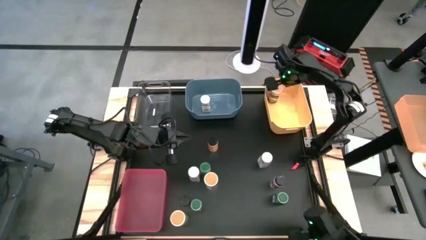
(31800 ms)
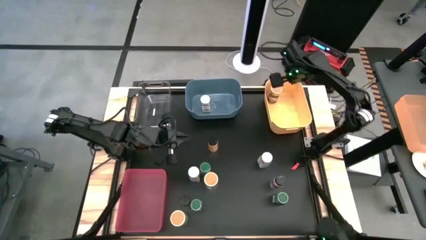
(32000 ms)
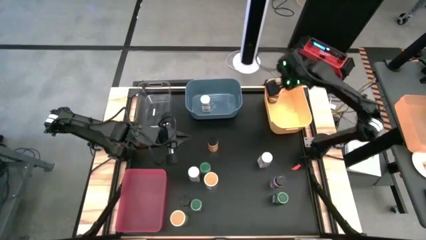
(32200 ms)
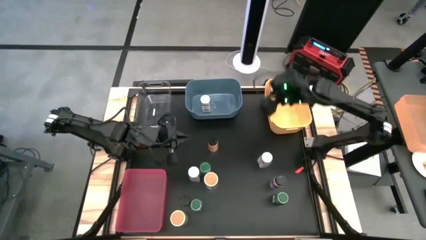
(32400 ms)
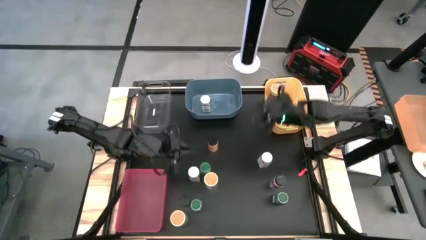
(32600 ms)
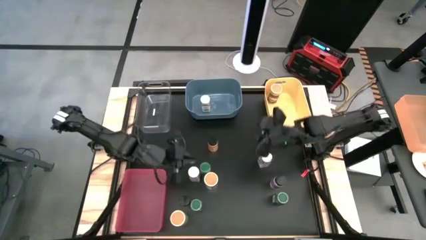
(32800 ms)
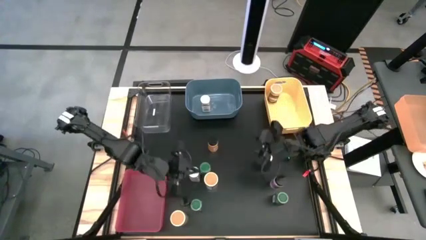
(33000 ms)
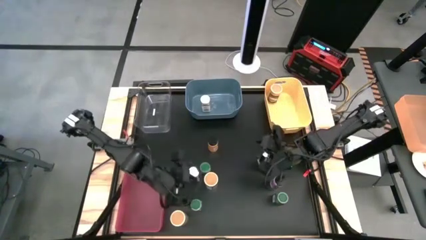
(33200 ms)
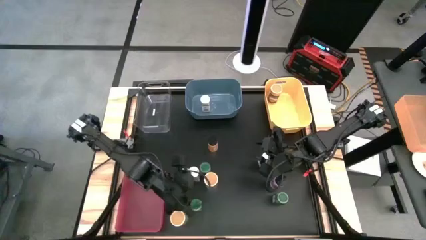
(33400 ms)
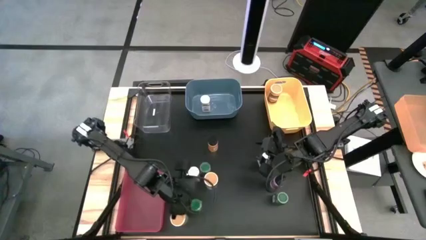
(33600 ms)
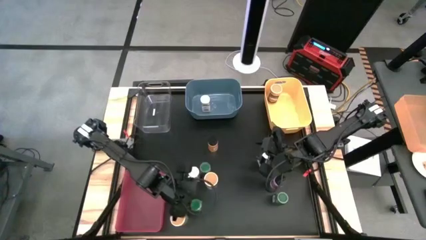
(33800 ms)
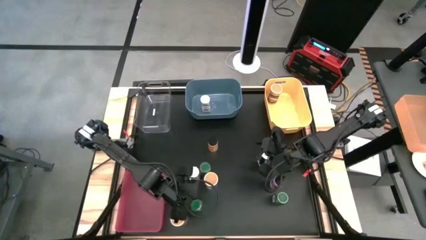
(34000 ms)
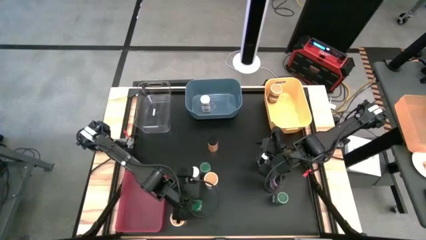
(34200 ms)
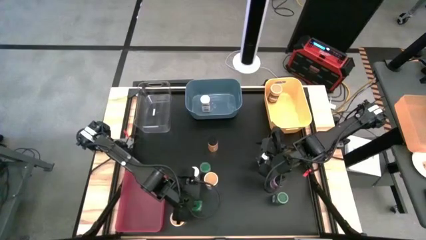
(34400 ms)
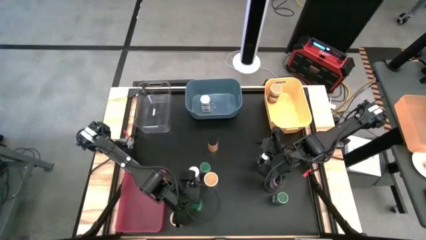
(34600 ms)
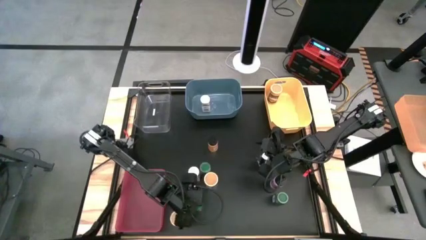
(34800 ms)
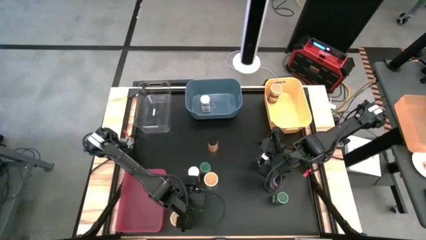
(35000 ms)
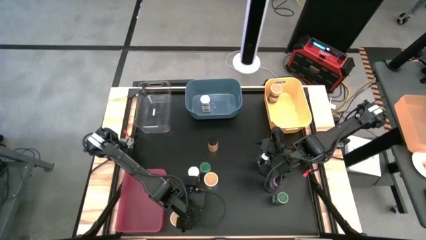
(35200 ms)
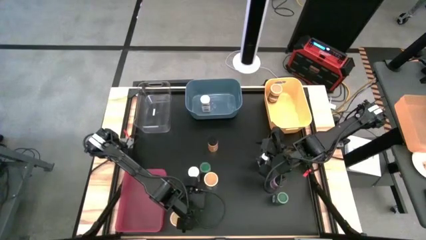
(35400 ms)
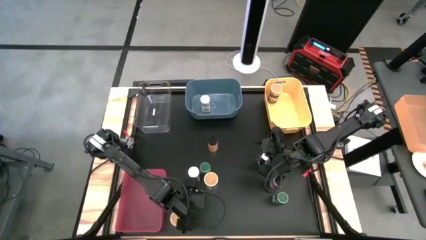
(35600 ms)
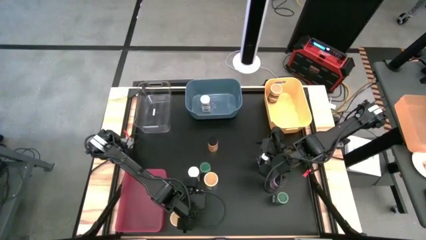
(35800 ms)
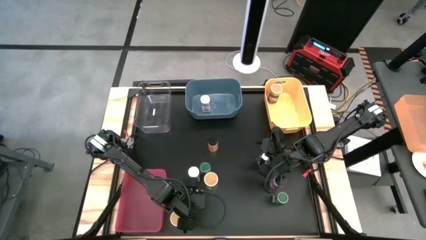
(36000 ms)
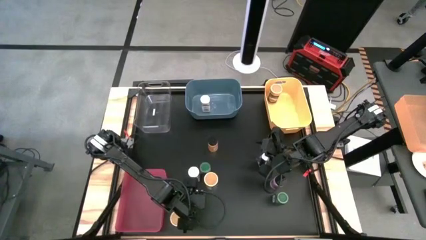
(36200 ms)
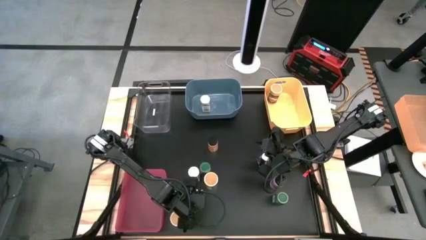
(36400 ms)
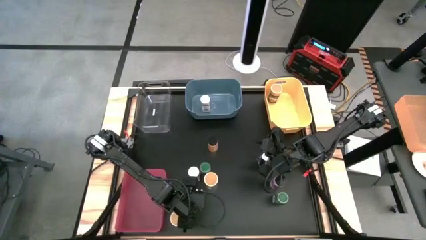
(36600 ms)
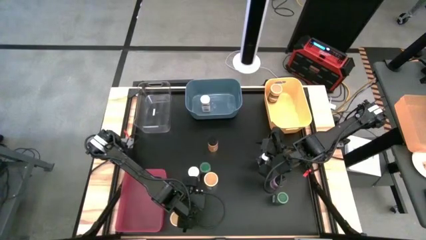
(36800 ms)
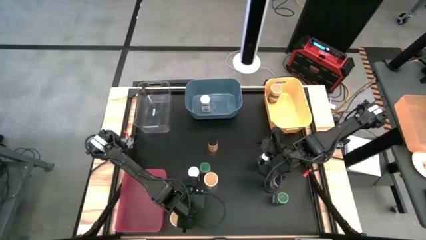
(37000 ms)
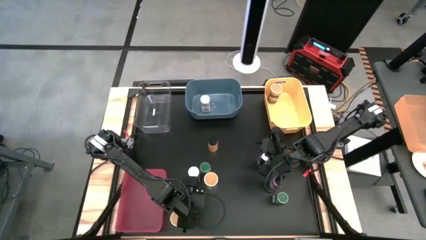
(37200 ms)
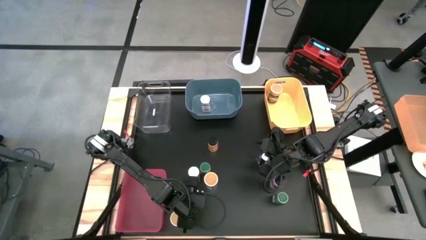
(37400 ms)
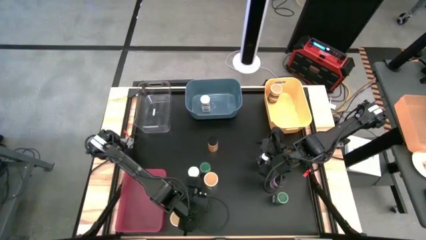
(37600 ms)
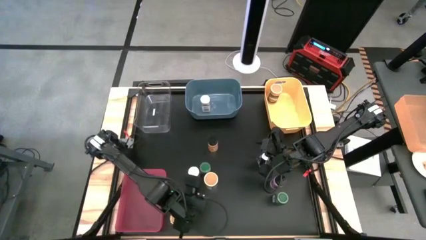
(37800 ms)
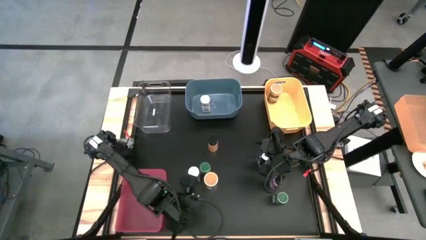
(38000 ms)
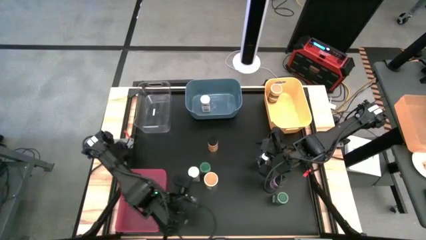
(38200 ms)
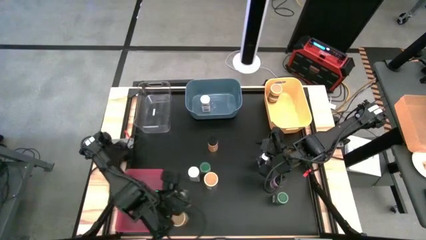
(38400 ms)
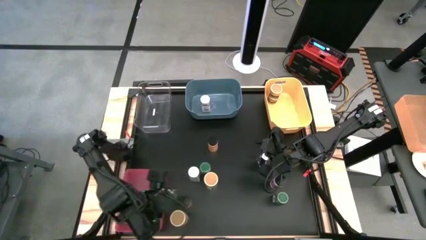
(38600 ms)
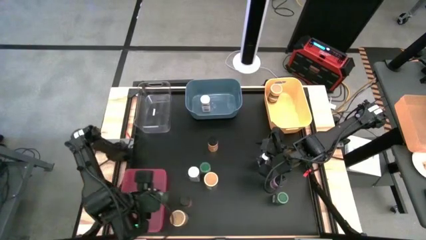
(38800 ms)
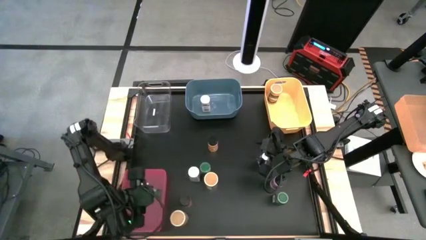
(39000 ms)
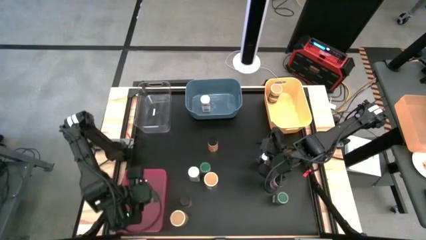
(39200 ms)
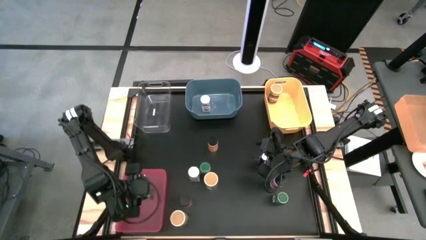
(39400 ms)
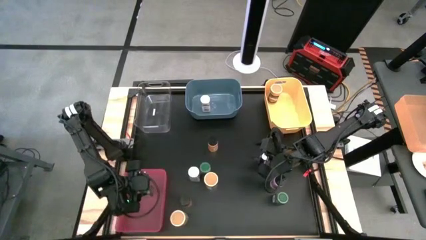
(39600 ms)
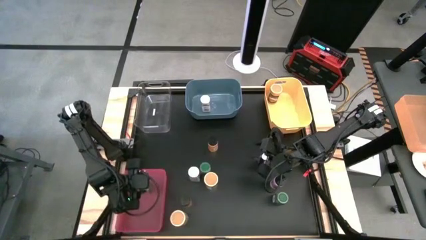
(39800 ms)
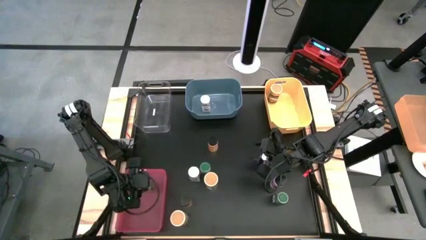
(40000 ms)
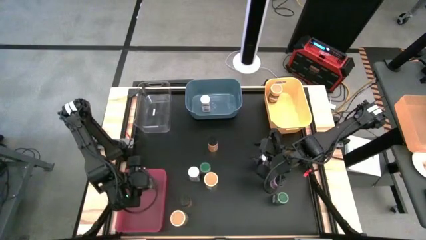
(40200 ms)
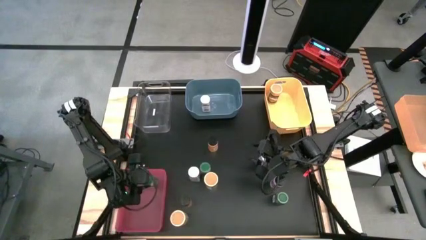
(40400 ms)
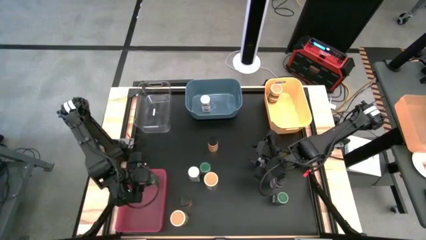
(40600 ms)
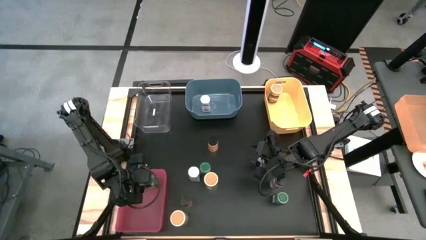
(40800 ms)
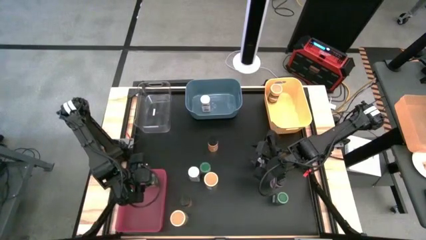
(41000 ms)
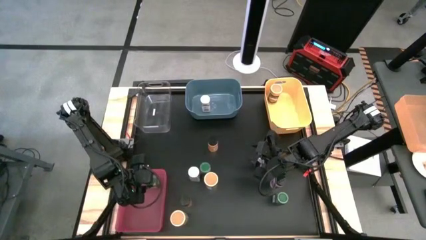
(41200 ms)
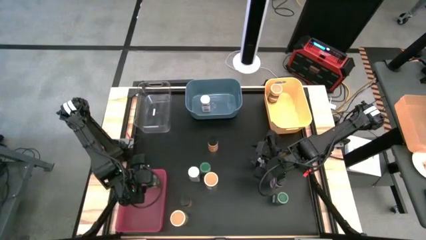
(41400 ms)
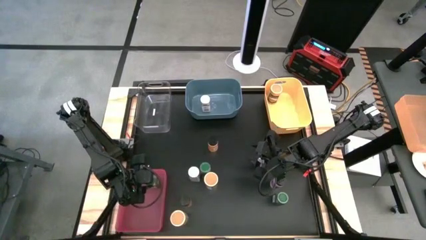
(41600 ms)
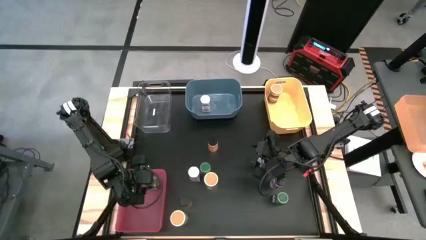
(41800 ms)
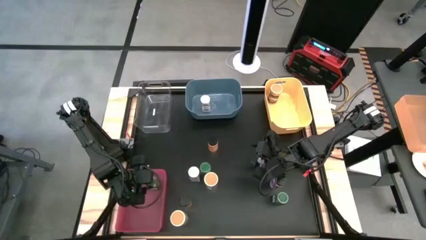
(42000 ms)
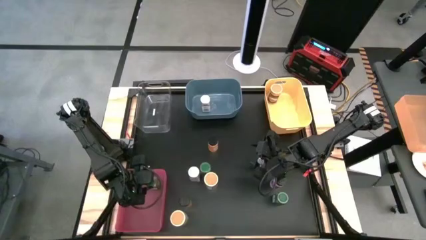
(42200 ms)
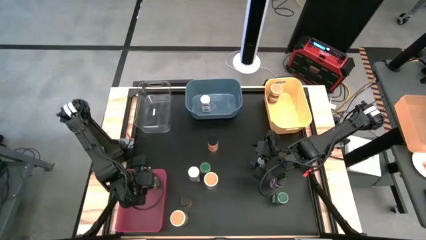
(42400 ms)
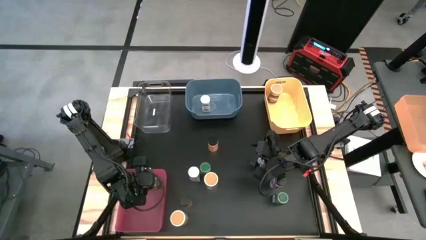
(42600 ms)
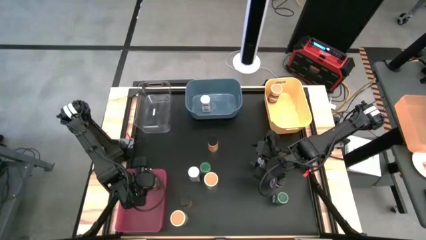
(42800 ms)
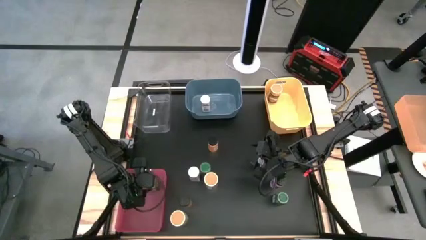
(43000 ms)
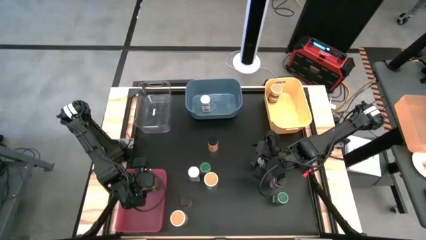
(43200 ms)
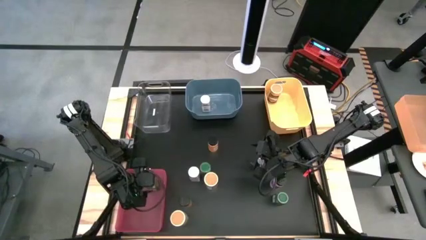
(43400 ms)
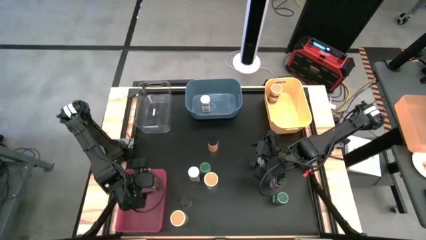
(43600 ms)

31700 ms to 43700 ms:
Task: Sort spices by type
Put the bottom left green seasoning bottle into the pink bin

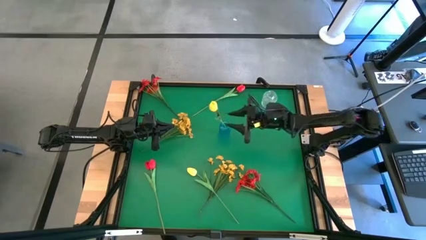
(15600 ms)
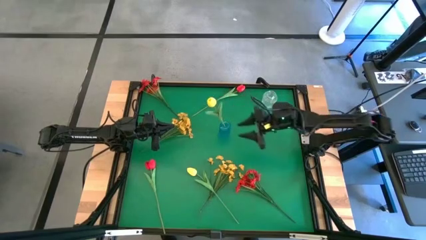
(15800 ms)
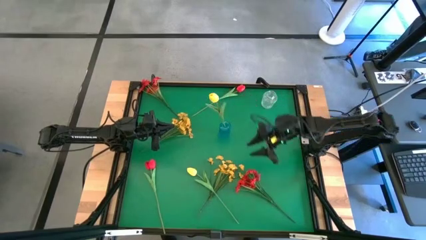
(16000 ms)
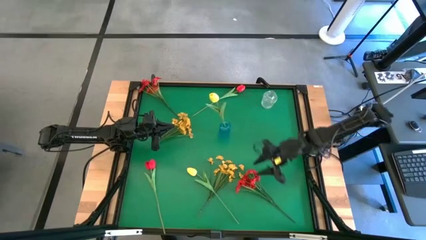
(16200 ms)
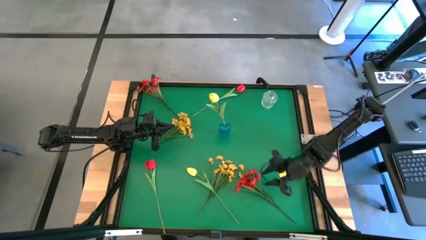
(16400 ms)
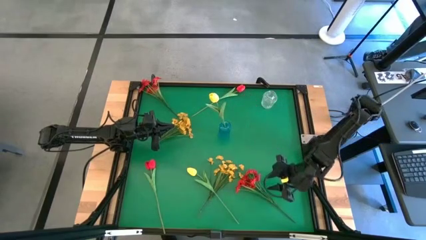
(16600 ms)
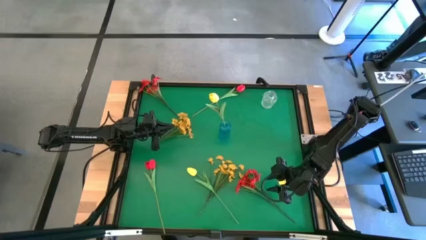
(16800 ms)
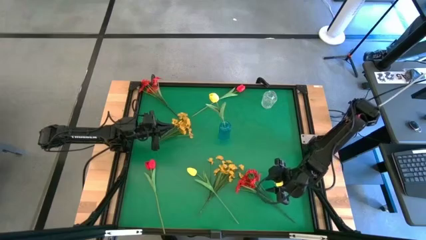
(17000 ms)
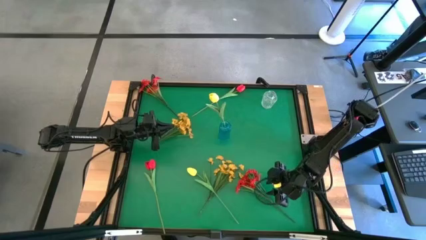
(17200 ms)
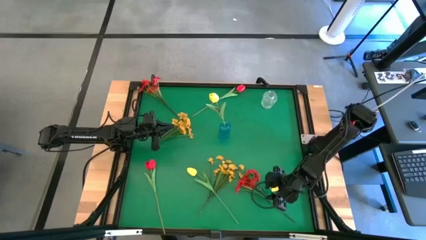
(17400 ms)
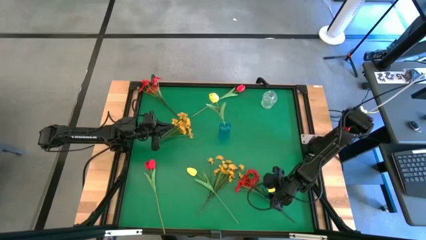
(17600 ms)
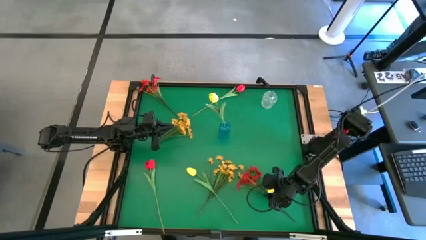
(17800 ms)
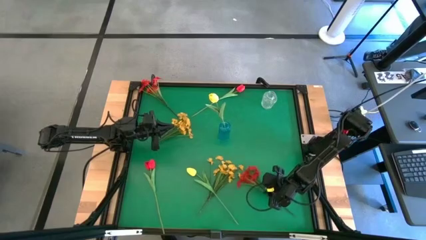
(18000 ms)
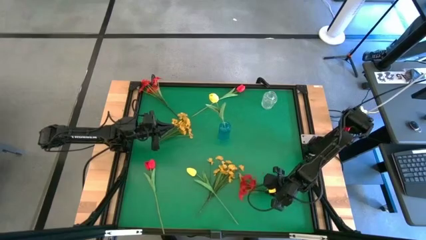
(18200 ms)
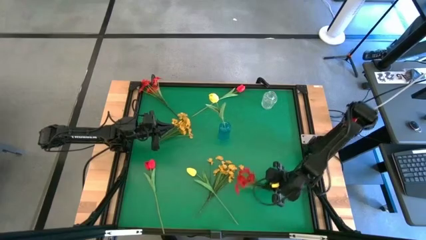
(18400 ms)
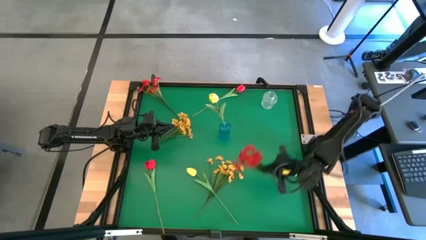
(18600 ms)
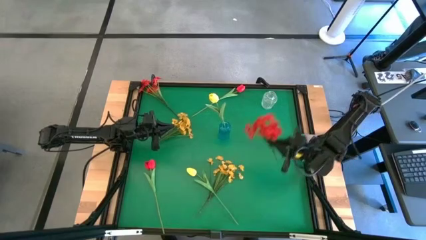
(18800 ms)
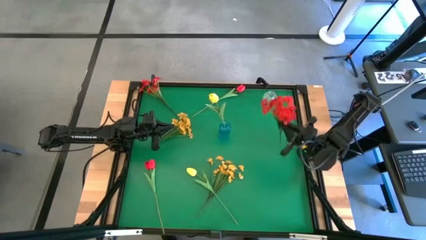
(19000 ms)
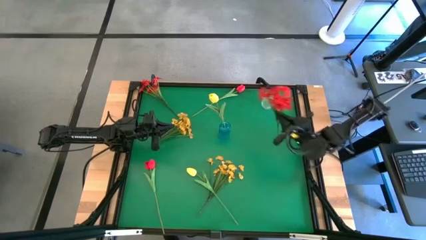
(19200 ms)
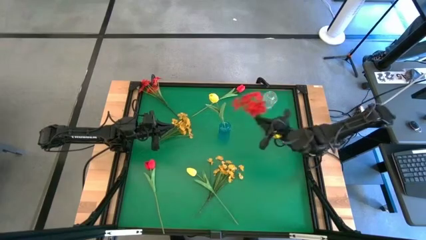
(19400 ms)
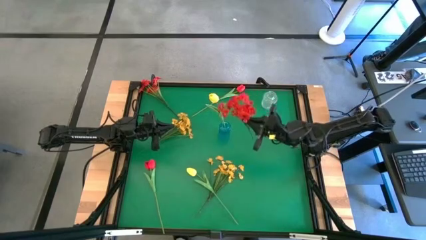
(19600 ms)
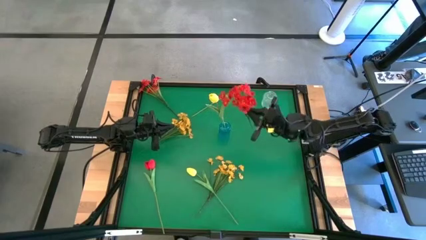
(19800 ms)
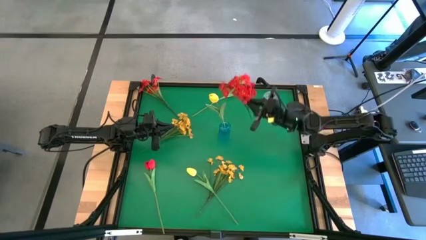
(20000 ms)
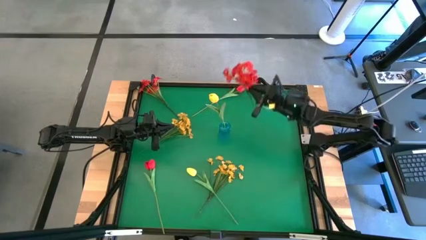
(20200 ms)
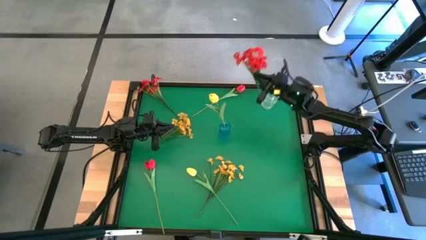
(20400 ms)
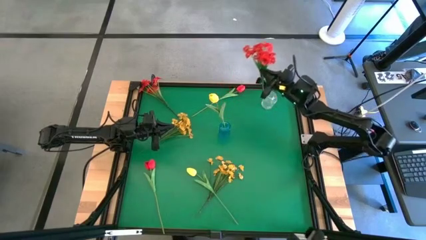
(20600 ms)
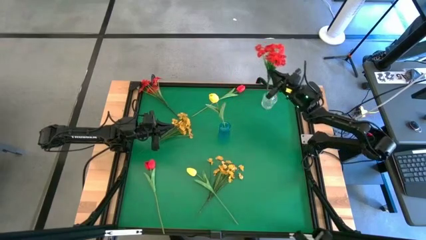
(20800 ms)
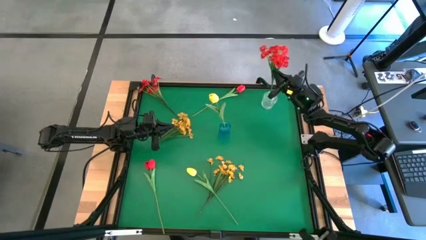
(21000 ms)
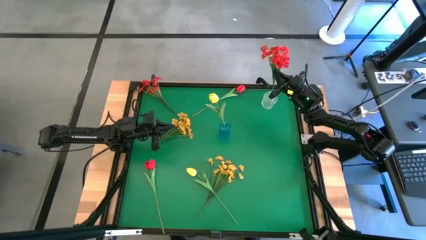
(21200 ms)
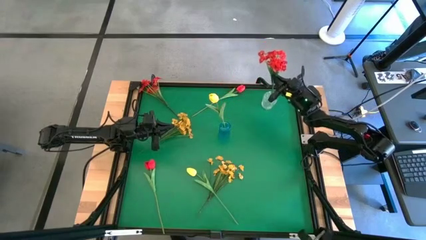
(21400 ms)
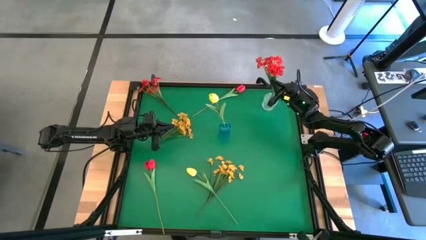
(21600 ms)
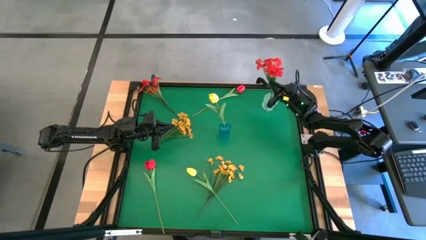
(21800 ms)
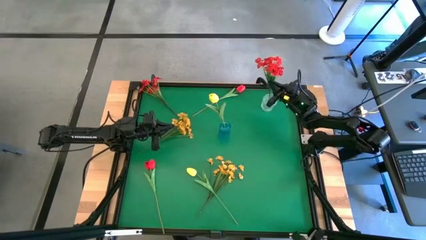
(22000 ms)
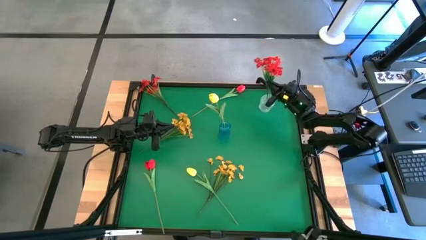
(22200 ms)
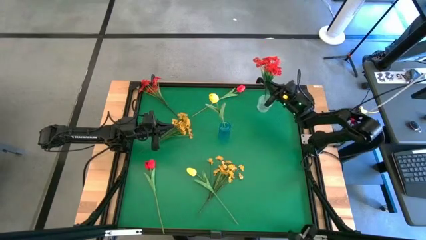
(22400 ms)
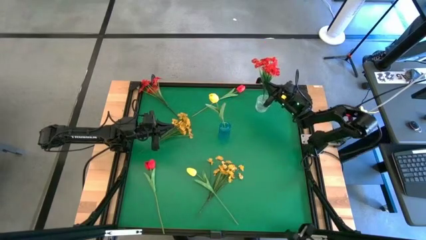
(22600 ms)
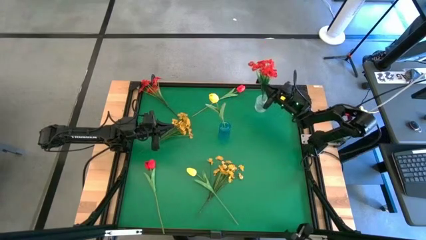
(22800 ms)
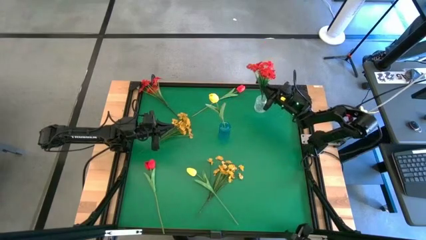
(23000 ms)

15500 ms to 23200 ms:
Task: Sort flowers into vase by color
Put the bottom red flowers into the transparent crystal vase
